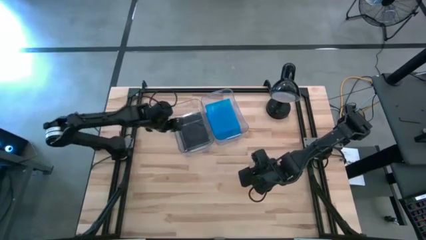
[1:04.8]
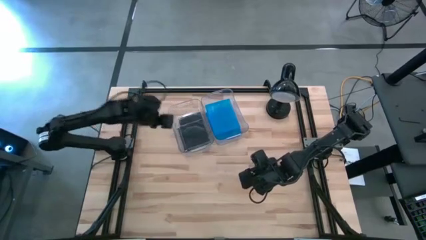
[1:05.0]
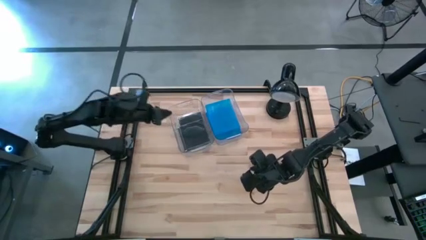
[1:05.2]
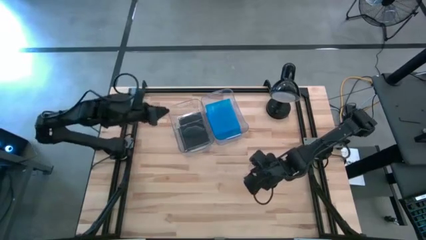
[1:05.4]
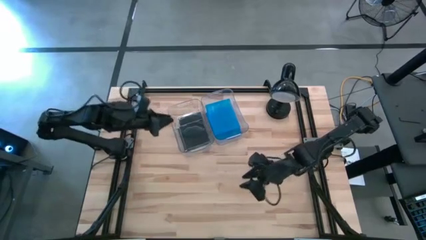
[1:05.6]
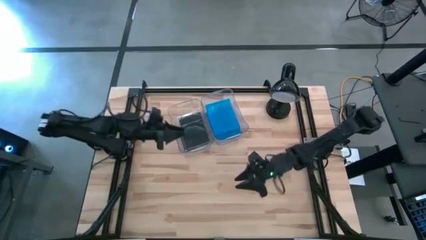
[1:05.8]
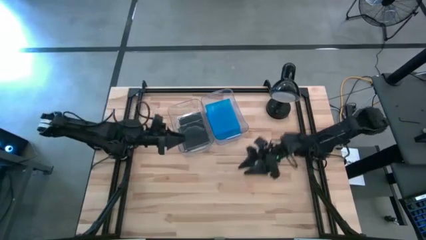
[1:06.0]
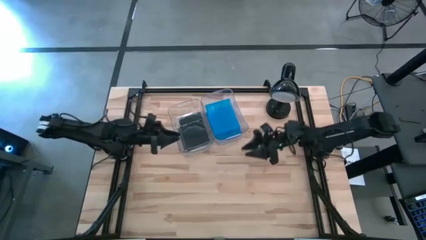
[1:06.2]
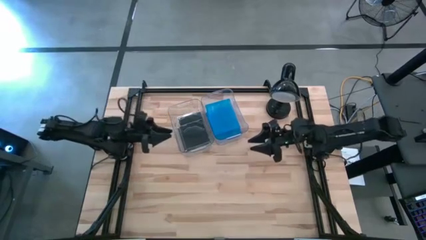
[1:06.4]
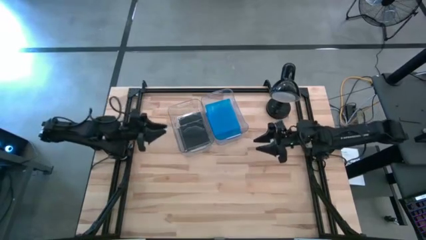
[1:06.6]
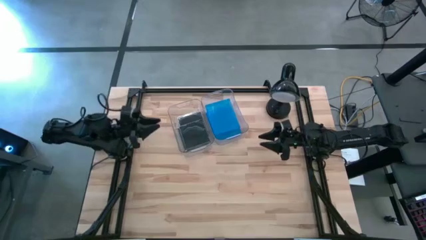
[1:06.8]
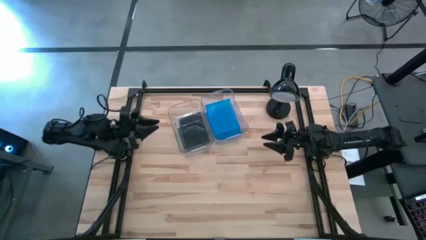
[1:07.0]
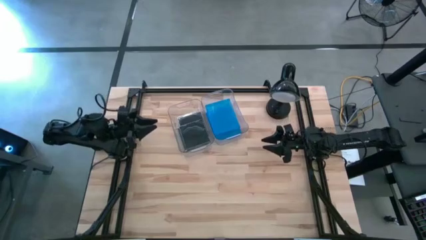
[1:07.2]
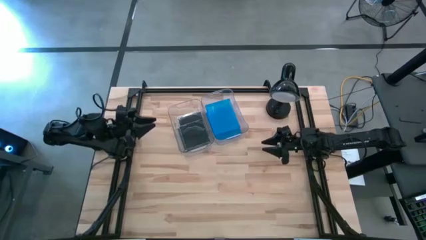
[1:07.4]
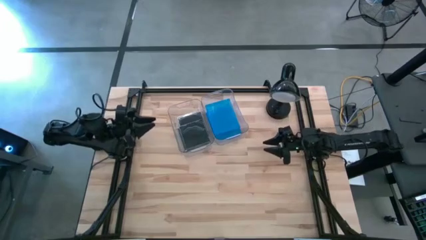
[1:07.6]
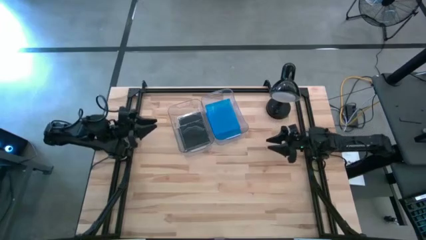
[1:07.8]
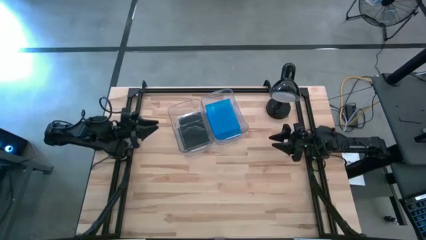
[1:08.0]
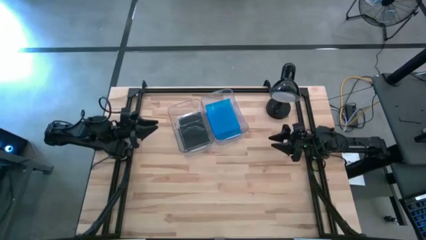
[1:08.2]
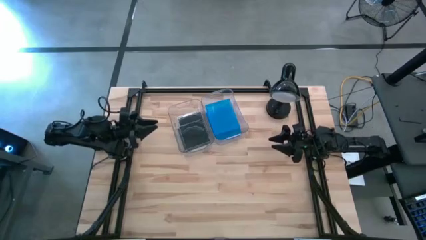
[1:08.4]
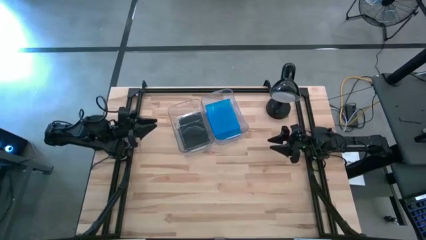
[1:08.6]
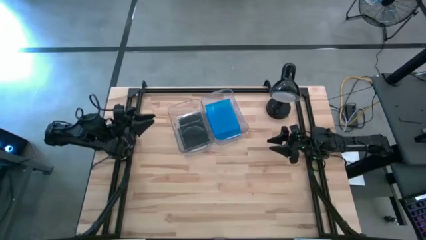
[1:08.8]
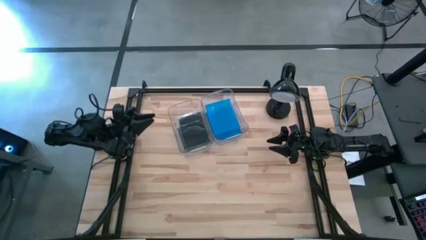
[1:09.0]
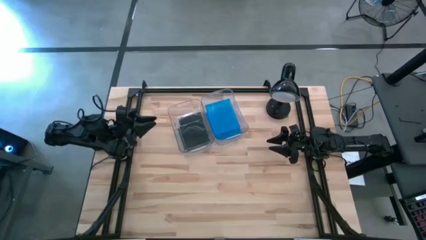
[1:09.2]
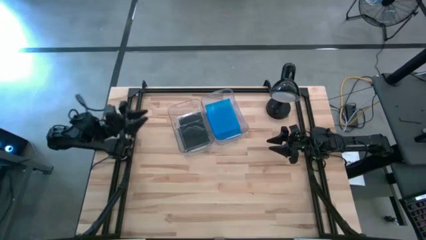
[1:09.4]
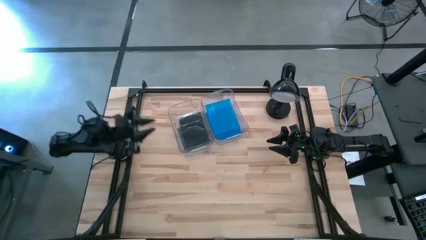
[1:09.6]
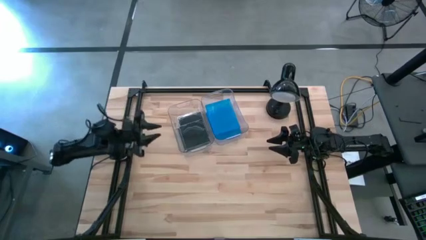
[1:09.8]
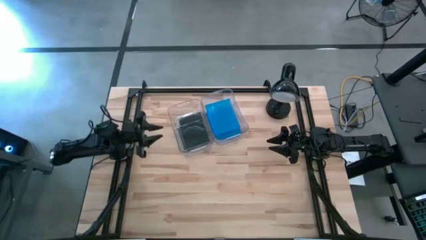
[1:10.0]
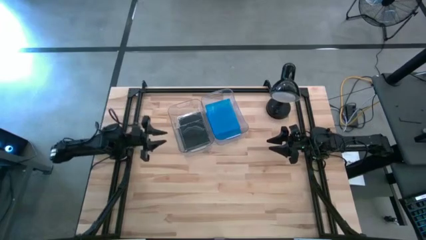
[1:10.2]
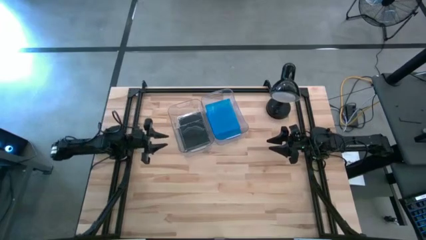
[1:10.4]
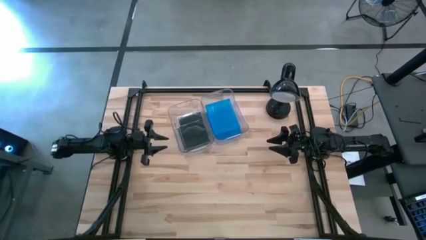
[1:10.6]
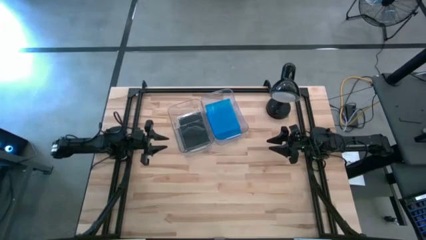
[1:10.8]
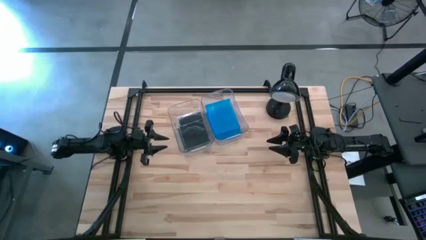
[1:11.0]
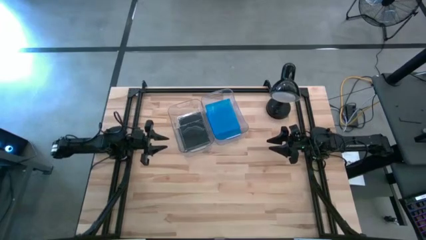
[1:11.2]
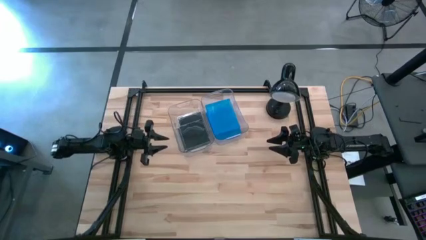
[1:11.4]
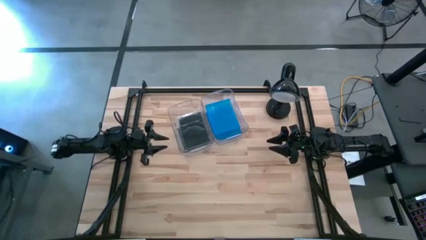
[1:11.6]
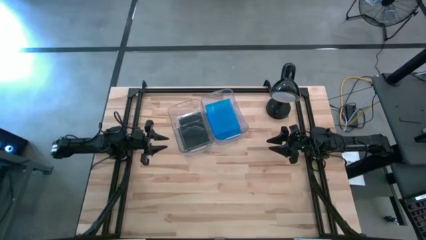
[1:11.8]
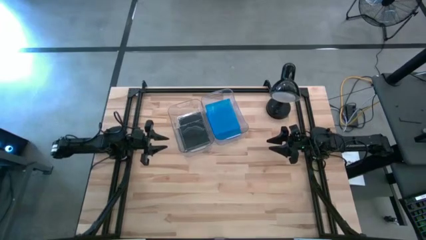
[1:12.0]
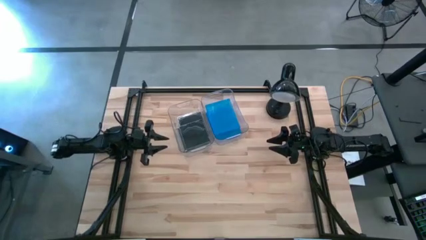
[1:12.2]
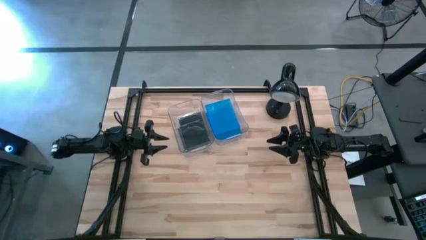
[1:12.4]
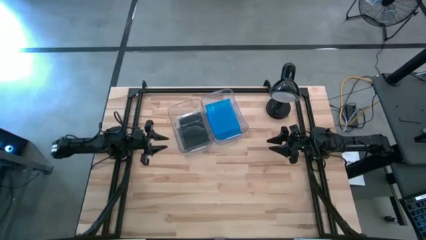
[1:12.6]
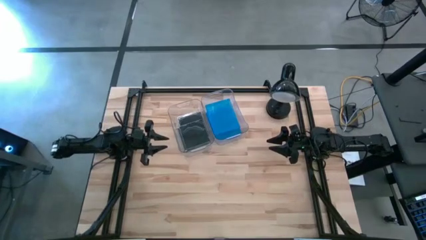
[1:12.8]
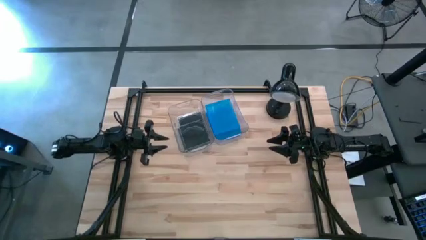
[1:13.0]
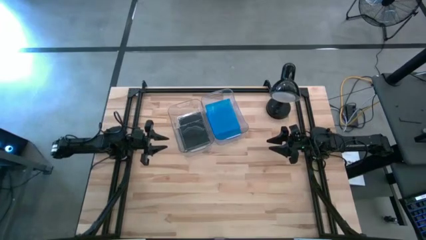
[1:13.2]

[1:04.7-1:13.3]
Task: Pick & place jewel cases by type
Return to Home Position

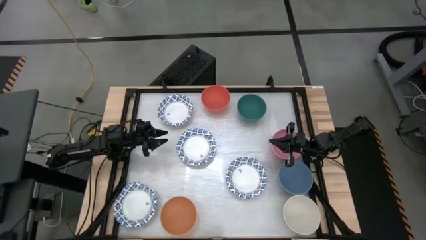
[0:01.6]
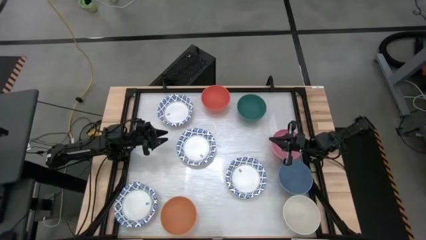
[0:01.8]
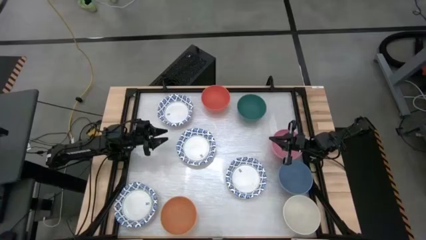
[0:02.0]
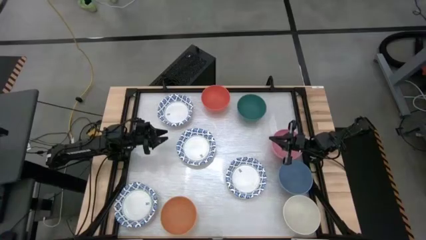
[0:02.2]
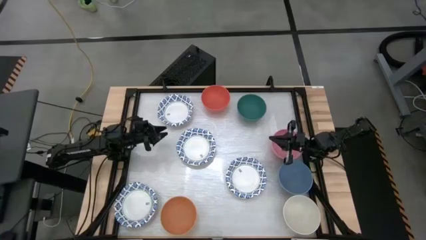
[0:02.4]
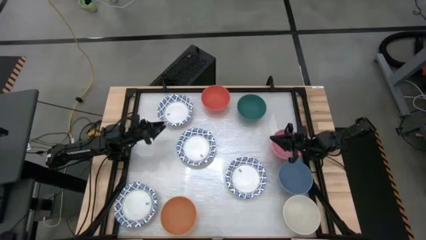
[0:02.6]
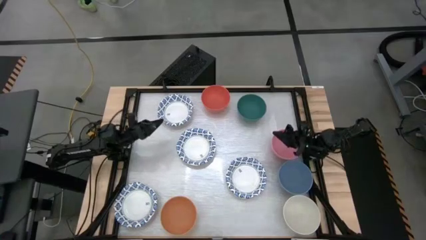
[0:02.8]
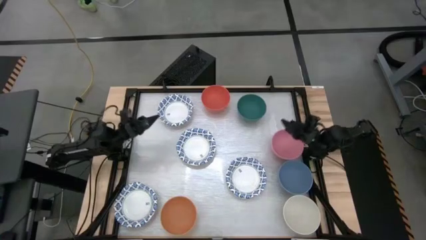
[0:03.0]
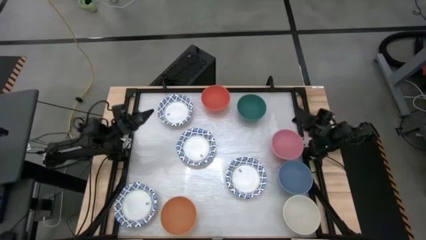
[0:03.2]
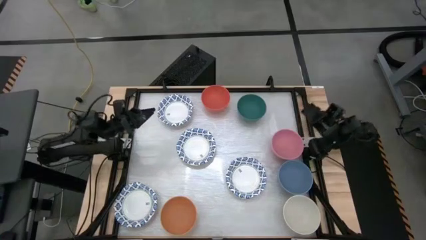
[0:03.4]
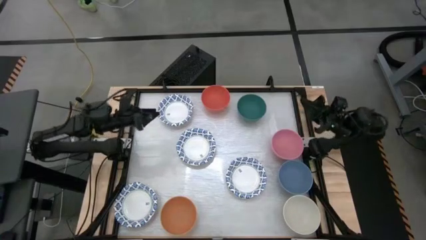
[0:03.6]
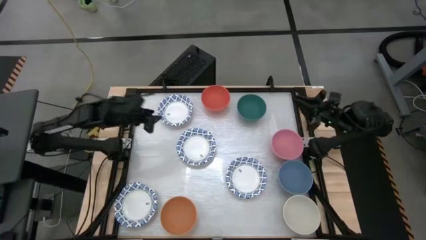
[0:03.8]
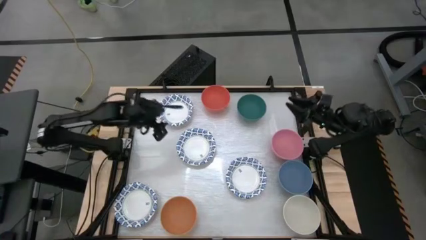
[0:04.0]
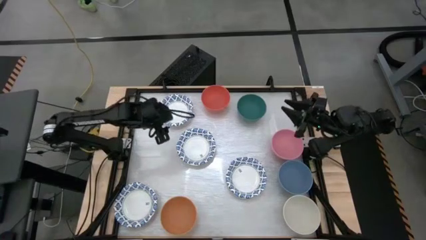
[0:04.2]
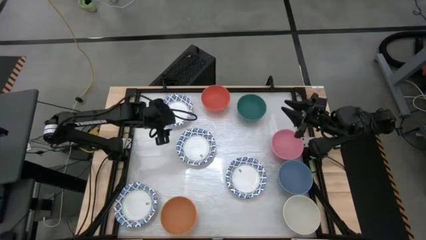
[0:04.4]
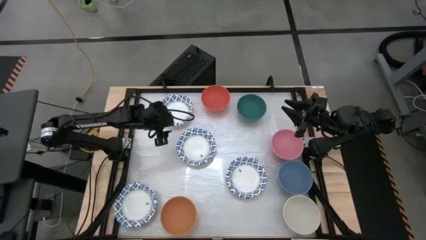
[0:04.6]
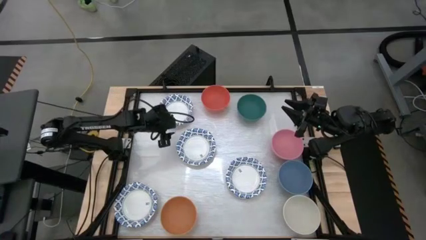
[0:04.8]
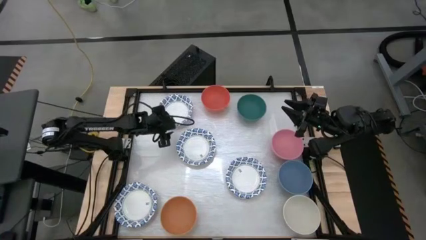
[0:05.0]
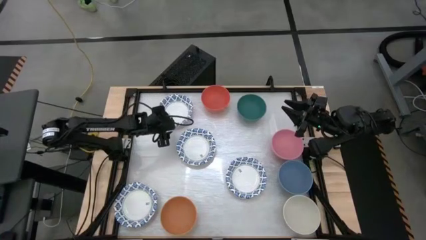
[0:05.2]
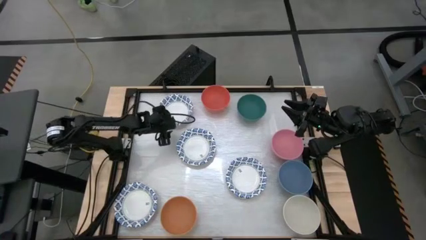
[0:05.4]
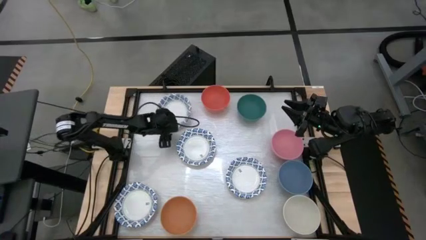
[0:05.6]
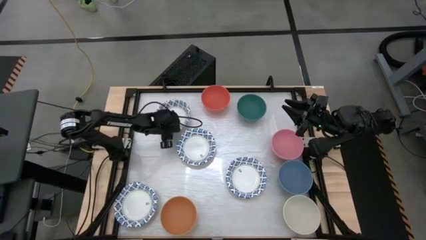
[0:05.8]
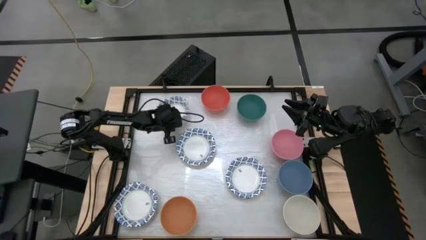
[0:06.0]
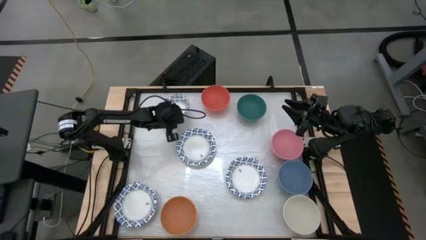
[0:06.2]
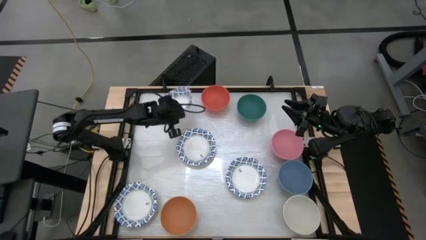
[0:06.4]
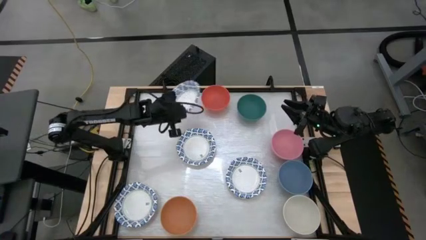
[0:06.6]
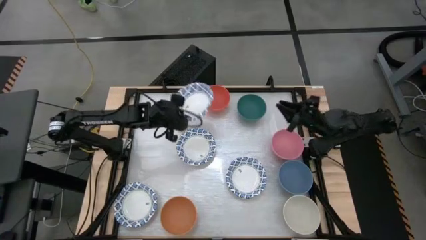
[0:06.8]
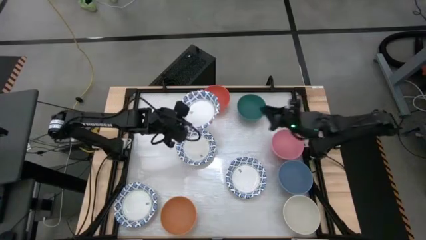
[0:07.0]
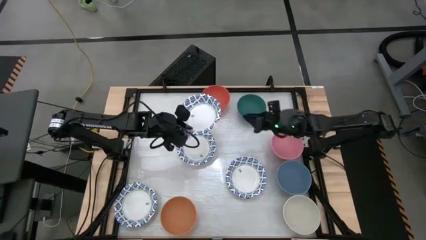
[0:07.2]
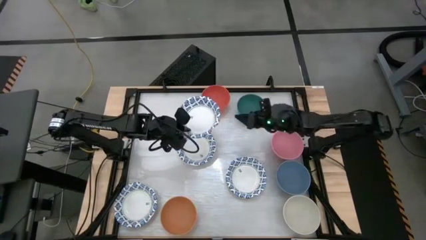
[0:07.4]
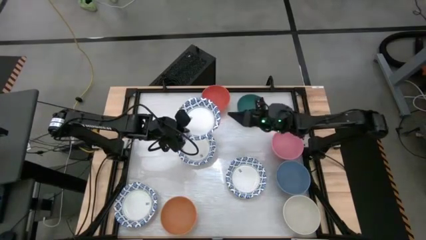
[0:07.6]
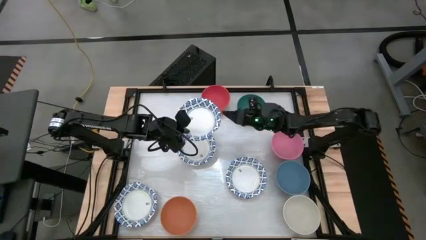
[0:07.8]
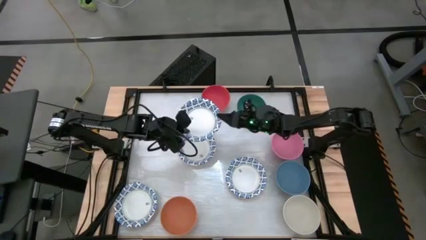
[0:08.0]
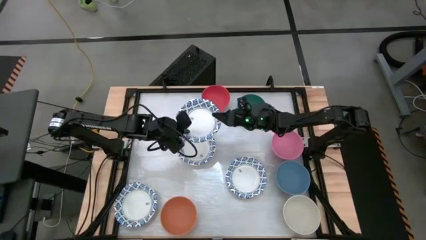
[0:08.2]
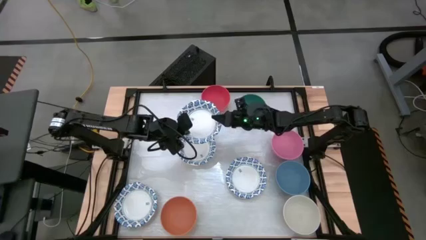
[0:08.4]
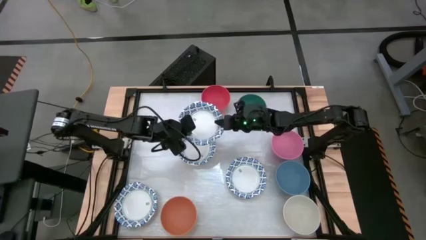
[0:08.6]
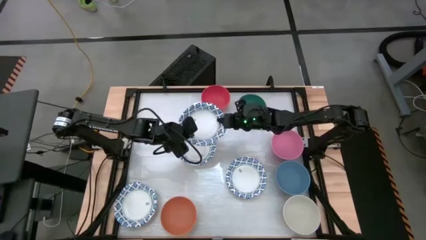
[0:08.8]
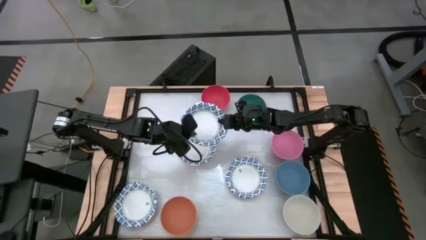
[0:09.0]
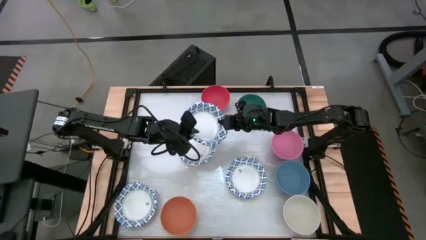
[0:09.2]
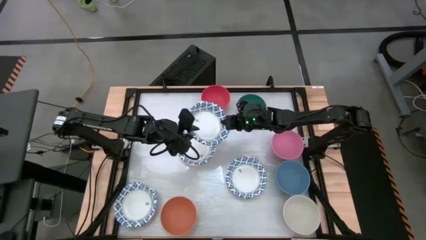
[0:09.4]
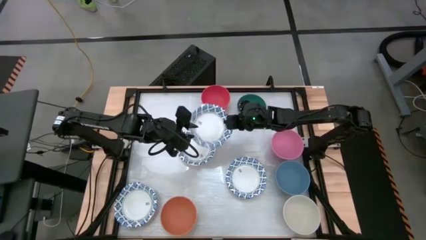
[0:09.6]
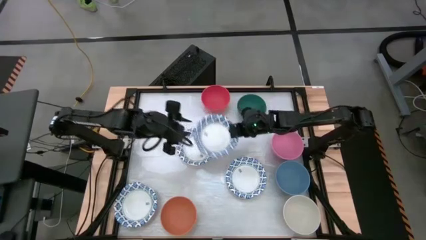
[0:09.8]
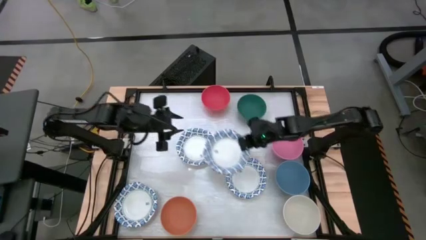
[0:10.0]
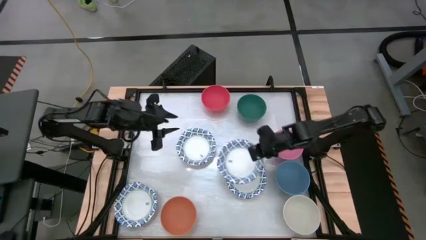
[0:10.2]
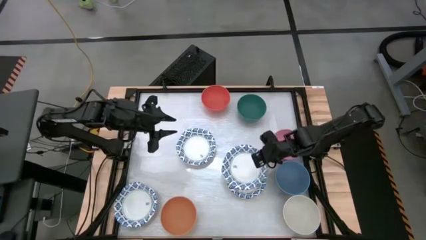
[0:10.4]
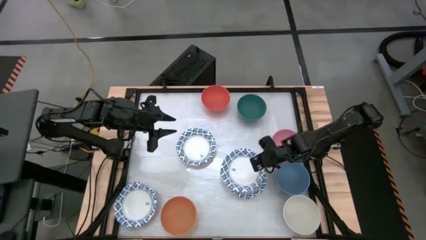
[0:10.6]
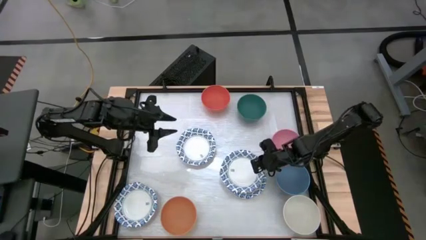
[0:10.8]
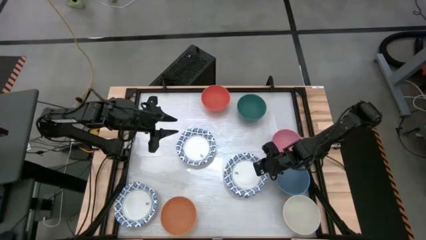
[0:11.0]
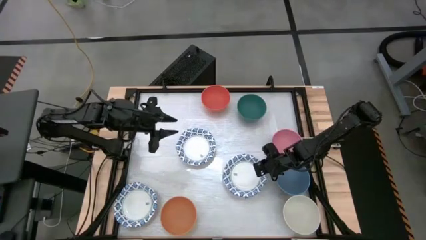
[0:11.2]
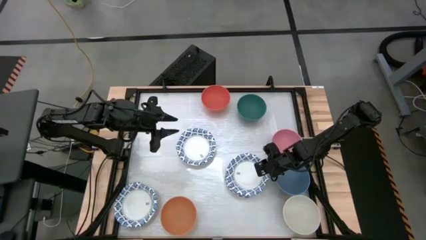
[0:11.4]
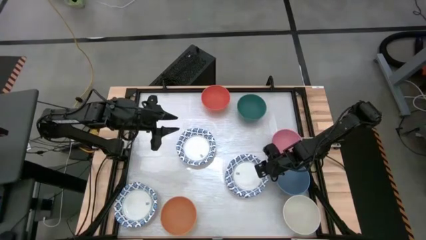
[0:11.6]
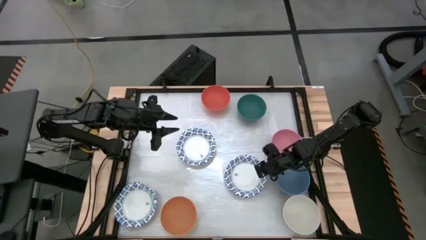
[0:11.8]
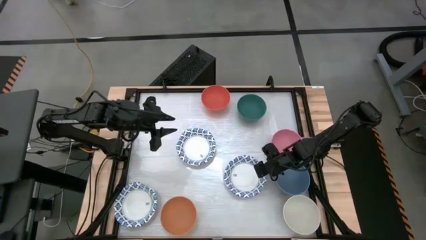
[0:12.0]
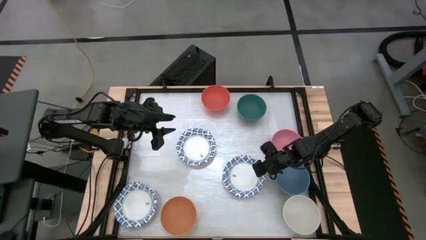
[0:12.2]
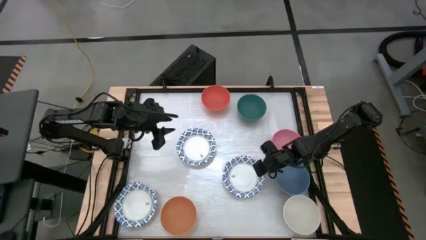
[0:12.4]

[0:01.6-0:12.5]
Task: Nest bowls inside each other by size order
Stack the top left blue patterned bowl into the bottom right blue patterned bowl
